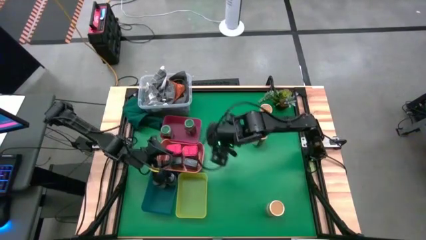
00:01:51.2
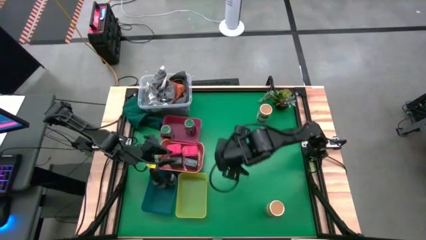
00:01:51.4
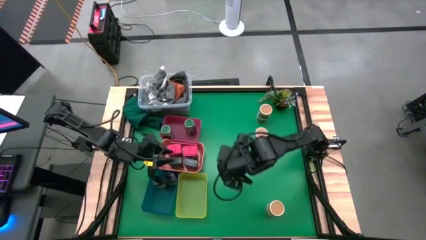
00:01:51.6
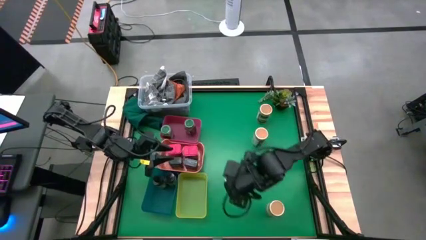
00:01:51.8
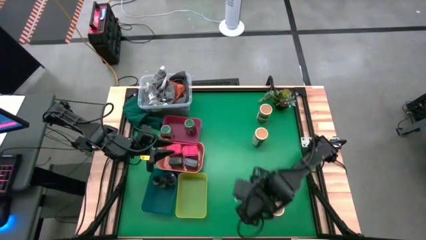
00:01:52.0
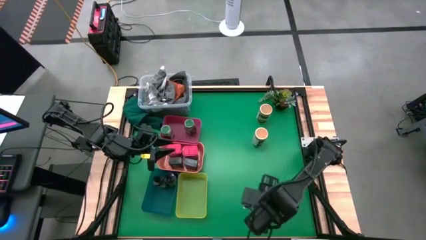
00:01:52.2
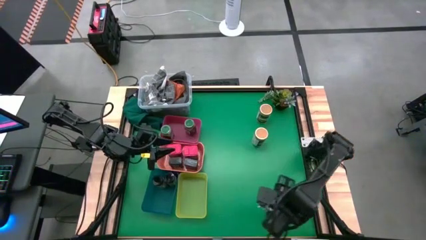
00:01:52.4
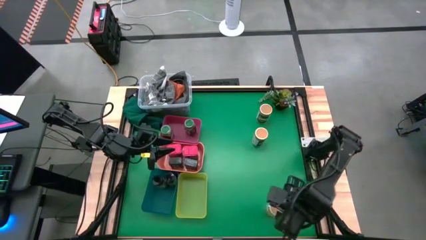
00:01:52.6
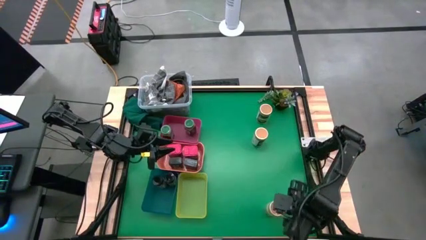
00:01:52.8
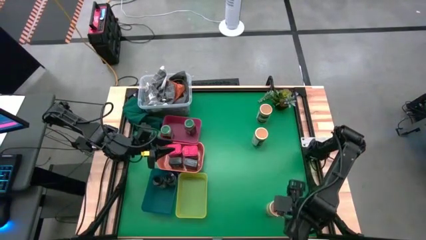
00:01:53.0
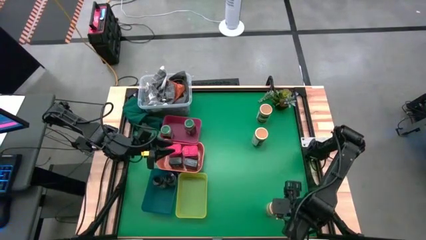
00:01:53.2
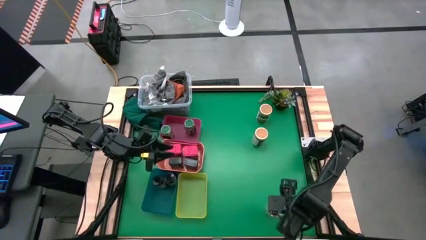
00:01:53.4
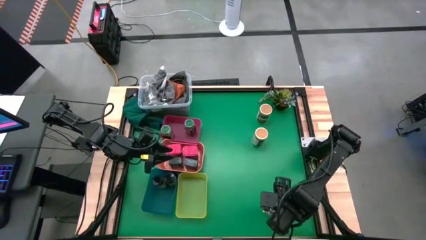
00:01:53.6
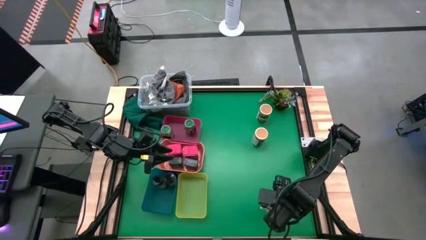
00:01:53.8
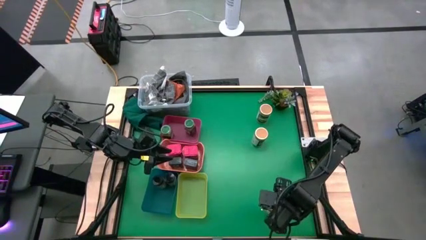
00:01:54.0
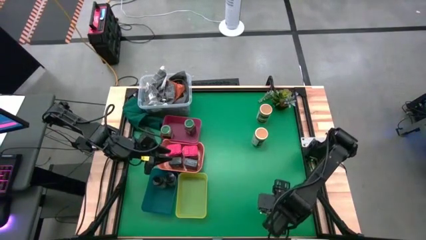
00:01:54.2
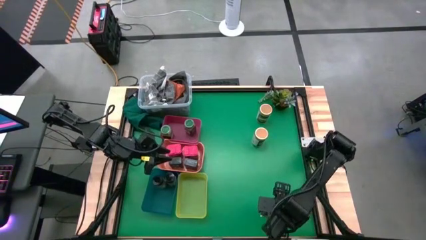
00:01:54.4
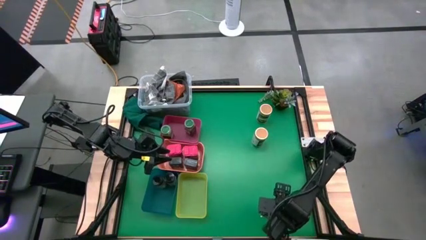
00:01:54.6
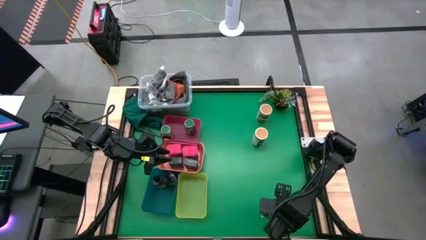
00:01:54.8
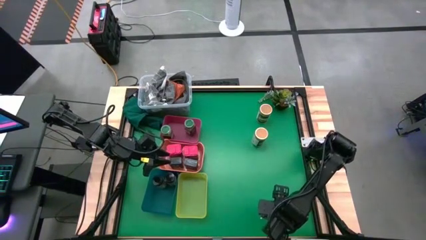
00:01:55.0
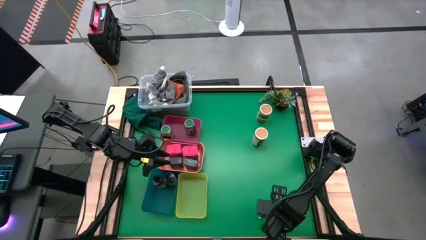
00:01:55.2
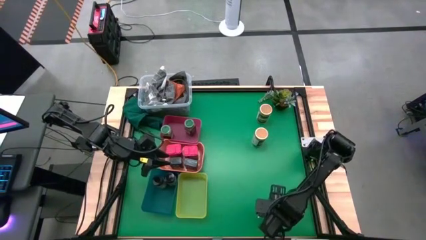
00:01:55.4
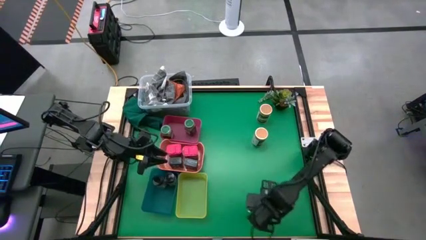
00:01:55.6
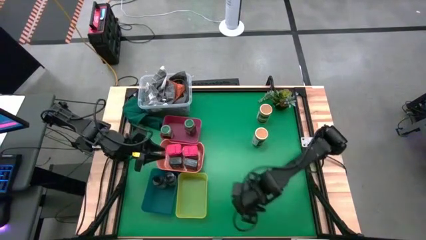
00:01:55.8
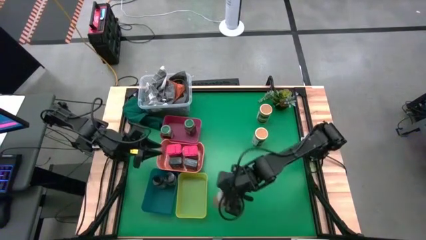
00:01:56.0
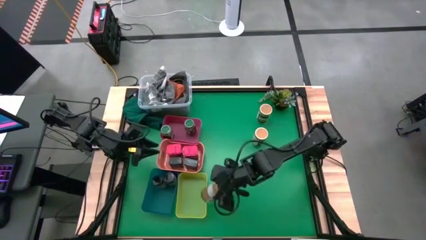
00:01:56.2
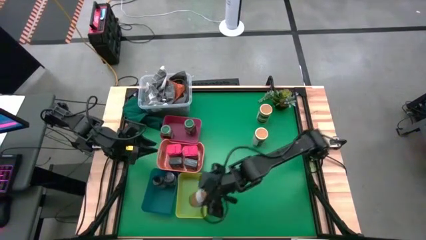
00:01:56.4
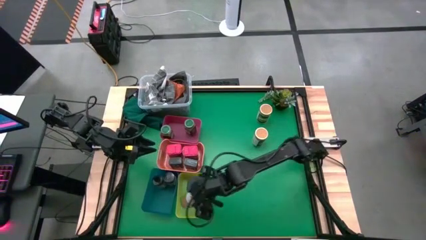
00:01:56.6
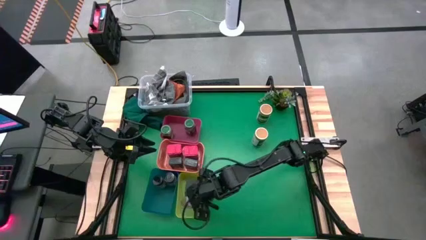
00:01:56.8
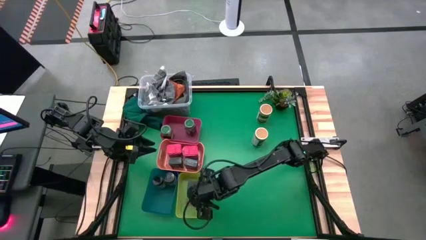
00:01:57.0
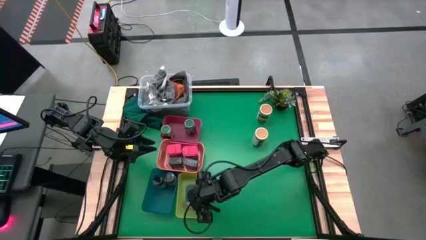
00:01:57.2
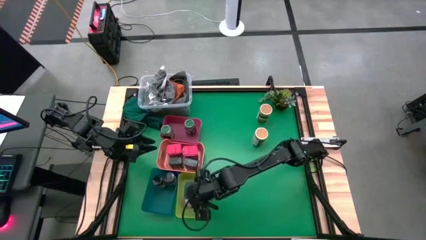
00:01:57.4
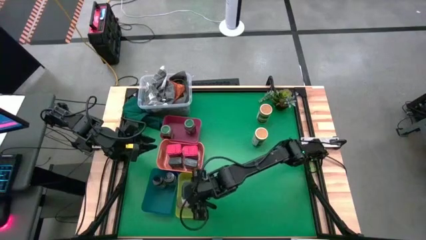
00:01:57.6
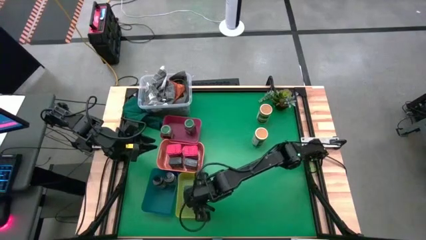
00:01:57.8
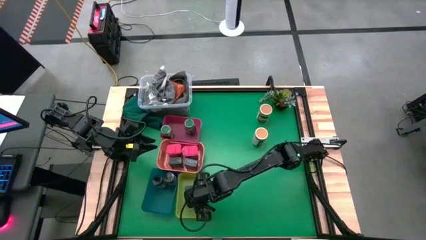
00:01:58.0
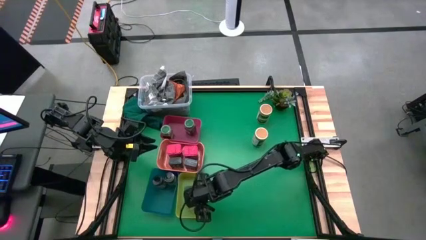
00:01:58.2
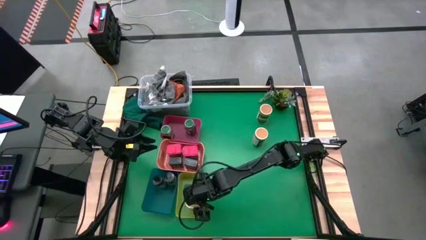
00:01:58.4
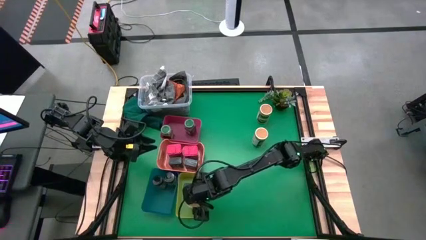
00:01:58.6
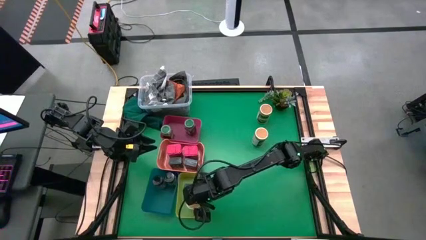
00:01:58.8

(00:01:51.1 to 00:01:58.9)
Task: Sort spices by type
Put the bottom gold seasoning bottle into the yellow bin

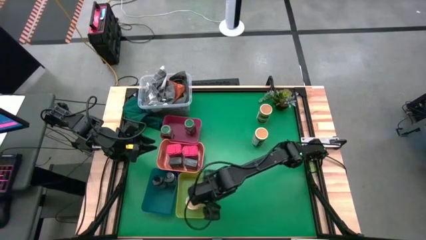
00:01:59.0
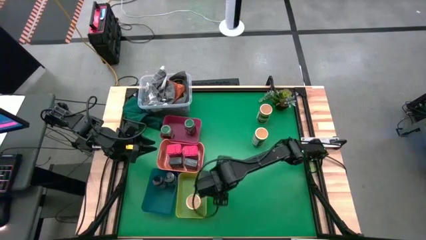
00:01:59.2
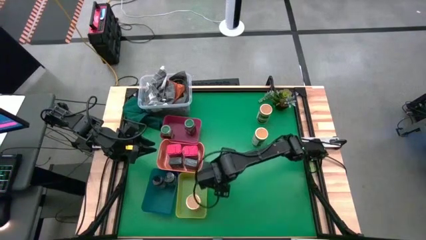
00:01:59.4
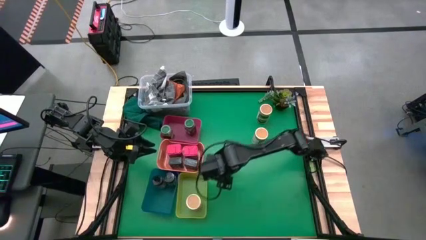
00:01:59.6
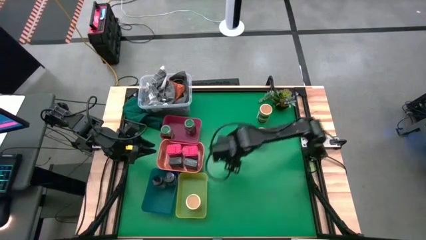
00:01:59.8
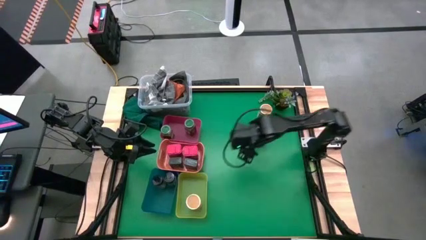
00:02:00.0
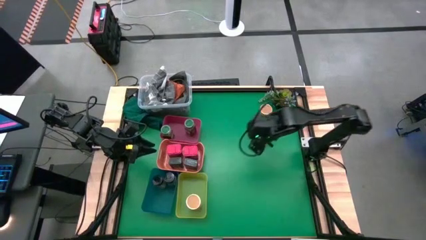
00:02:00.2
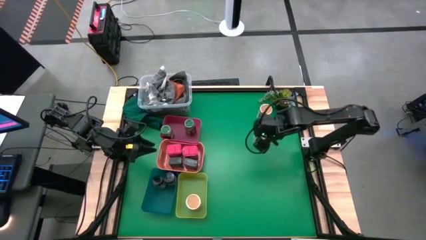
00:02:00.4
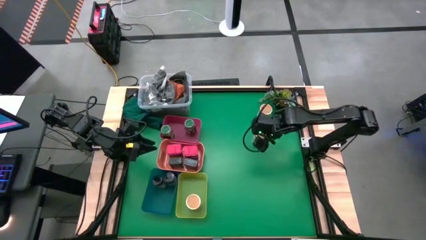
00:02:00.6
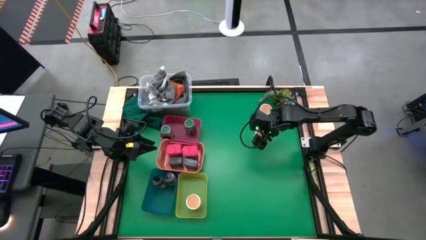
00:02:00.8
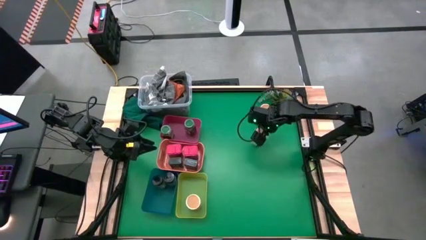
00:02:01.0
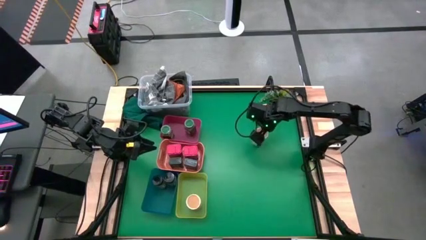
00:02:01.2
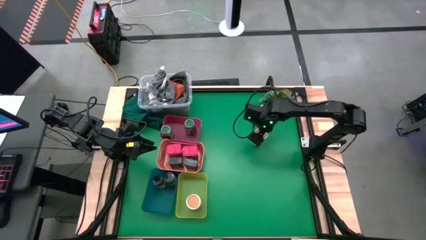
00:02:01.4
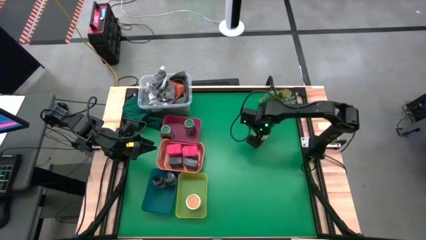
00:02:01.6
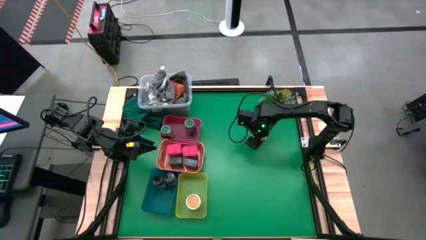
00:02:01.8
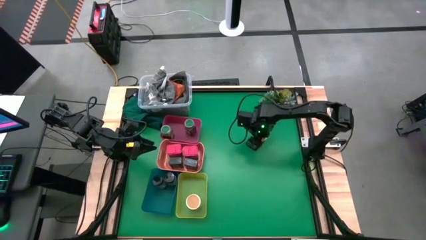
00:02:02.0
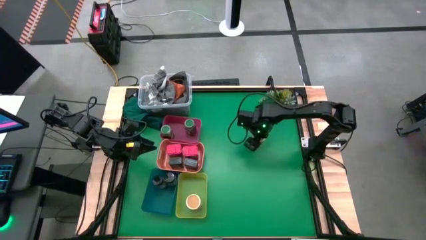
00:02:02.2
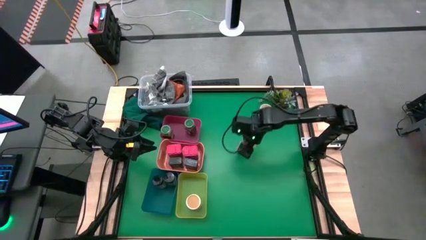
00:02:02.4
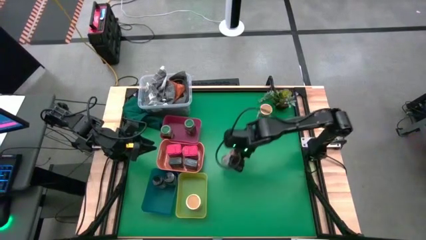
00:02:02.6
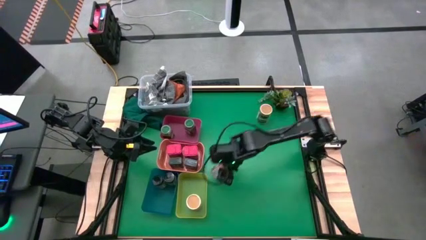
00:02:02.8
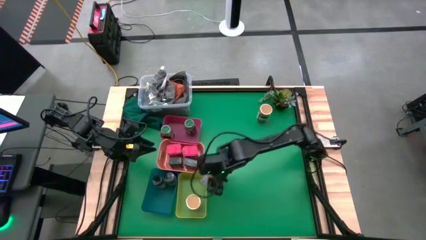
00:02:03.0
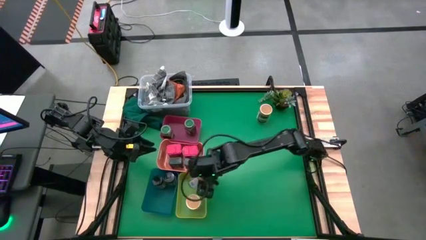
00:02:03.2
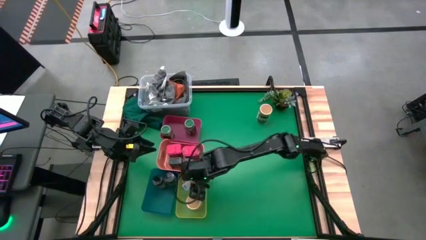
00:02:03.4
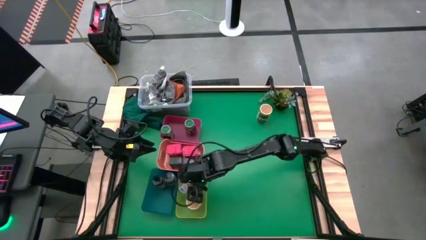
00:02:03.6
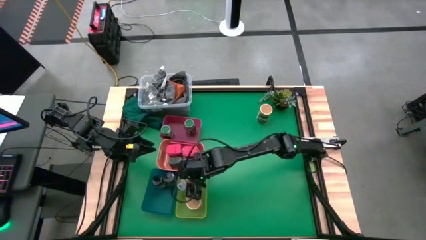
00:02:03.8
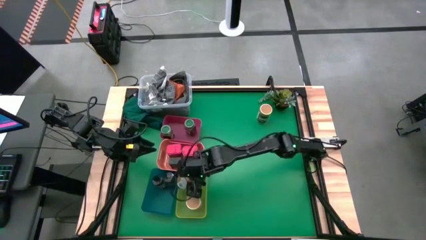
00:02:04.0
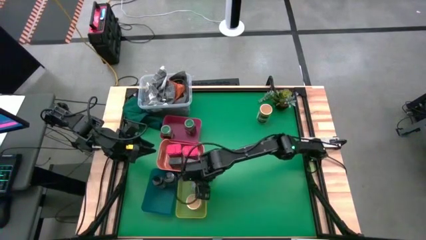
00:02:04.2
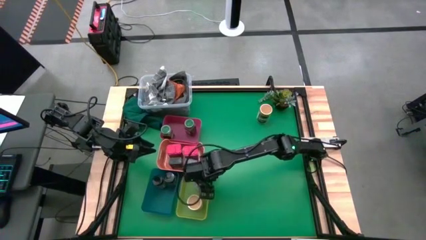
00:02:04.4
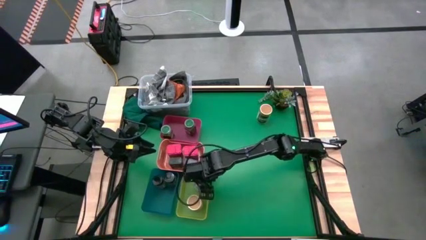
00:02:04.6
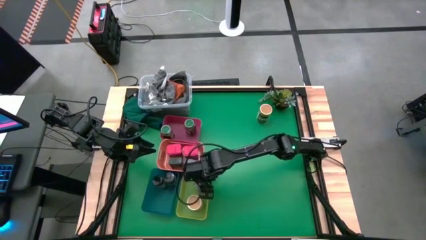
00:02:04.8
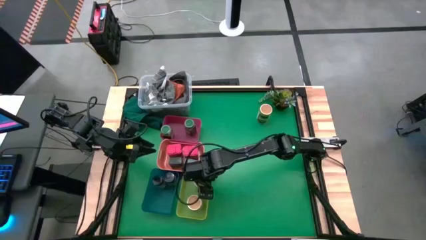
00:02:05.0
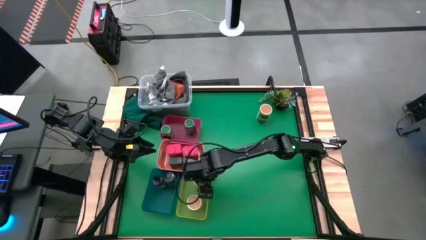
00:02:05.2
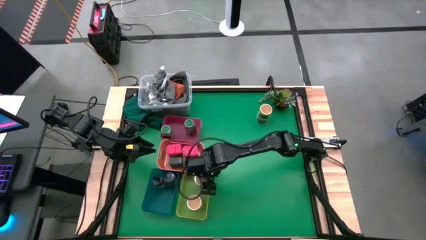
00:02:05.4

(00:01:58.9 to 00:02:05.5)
Put the bottom gold seasoning bottle into the yellow bin

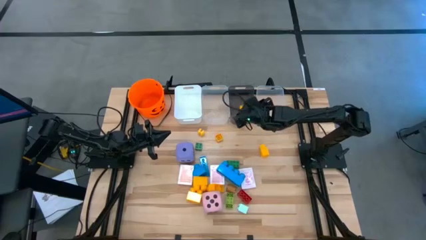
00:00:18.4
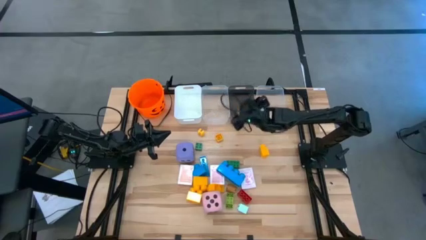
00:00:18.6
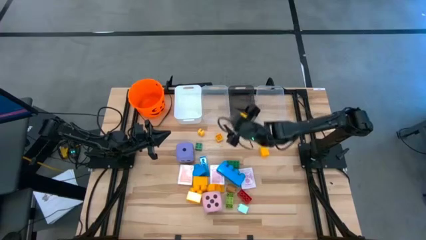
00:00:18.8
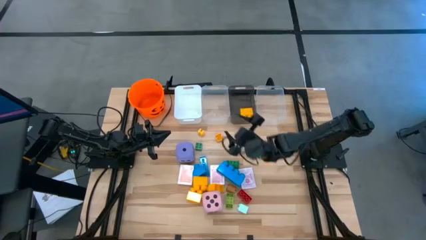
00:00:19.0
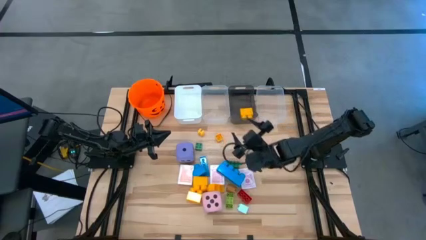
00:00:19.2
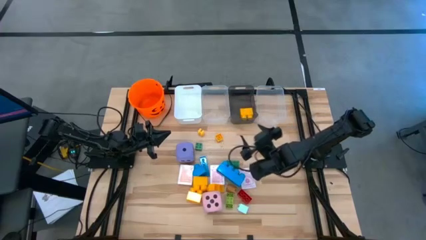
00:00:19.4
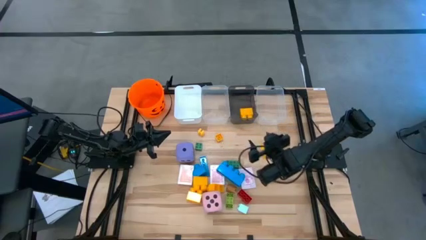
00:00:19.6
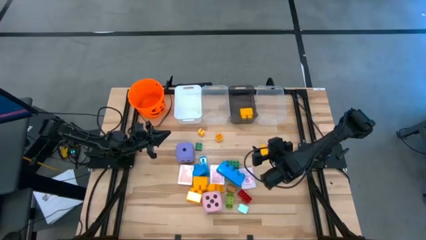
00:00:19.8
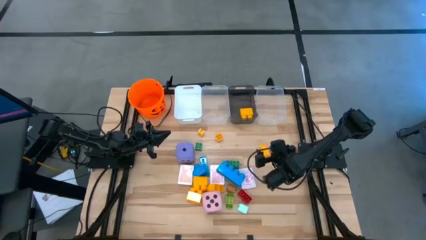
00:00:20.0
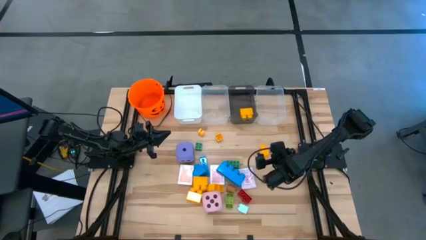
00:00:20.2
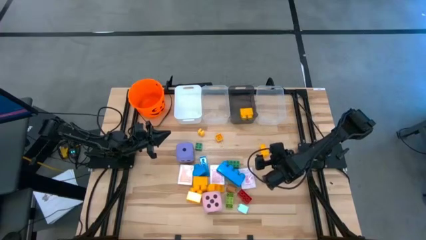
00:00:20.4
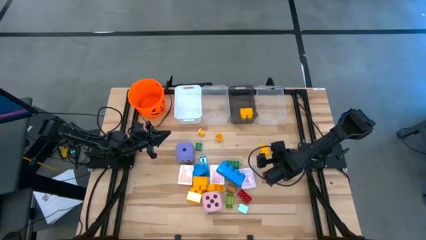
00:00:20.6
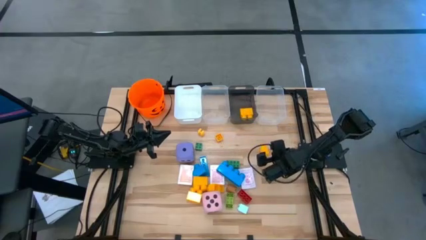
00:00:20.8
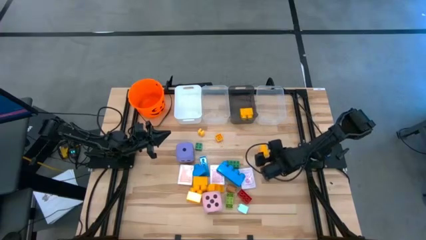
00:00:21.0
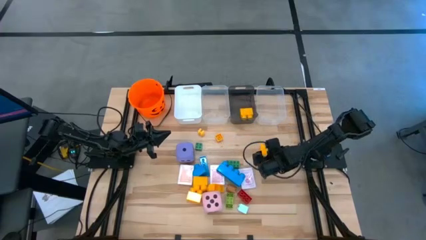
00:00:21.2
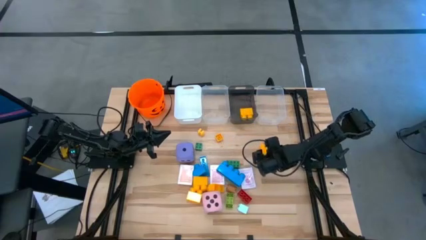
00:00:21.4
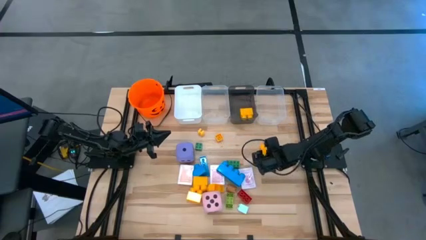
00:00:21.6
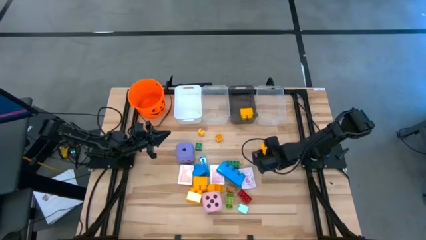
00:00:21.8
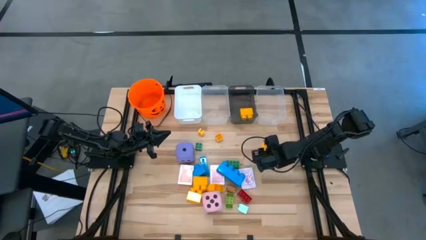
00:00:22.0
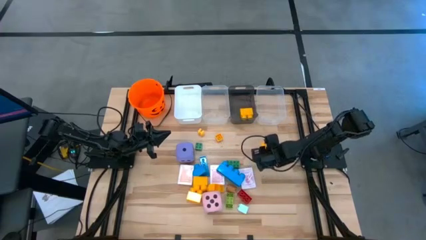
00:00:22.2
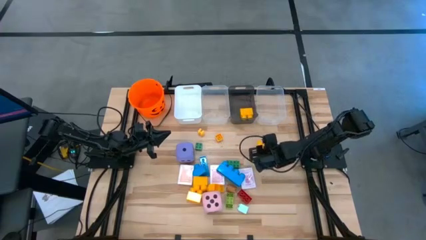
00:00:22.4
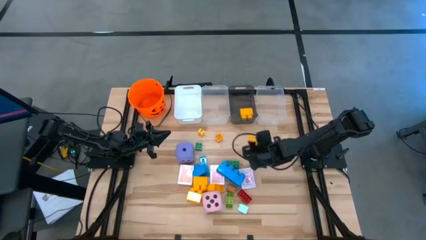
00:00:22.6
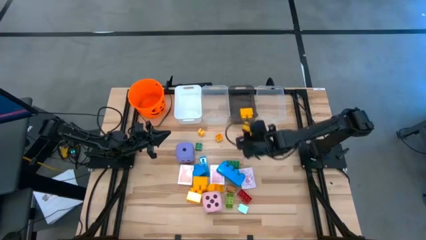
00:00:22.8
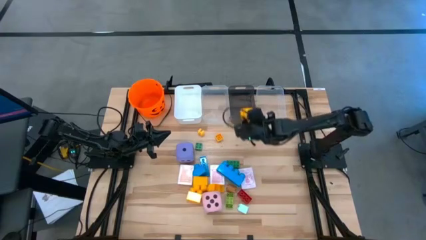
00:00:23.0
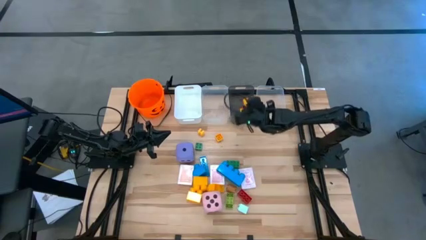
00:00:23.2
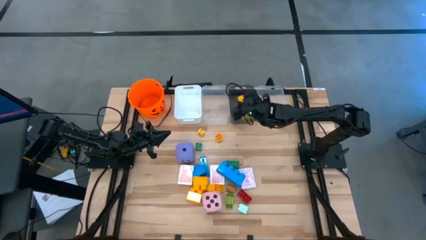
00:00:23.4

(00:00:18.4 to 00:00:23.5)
Task: Pick & Place Toys
Put the large yellow game piece into the black bin
